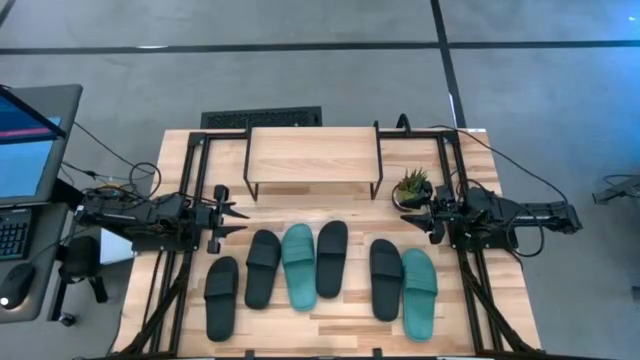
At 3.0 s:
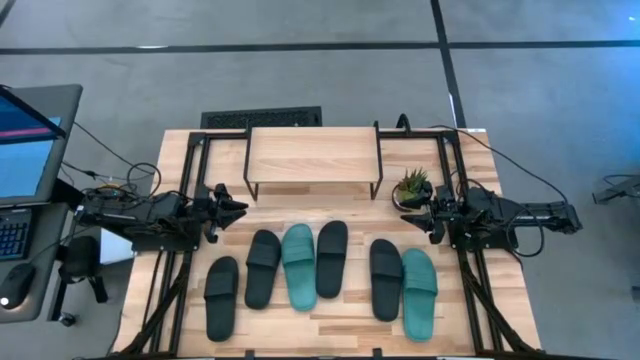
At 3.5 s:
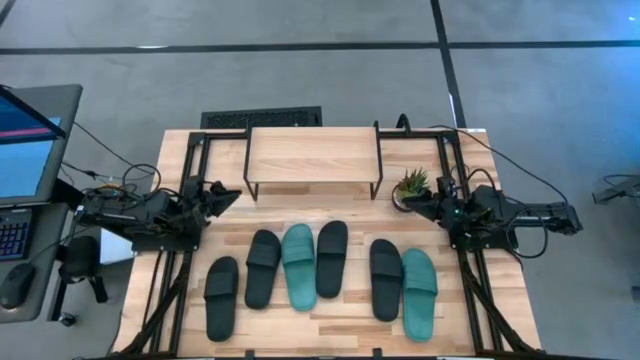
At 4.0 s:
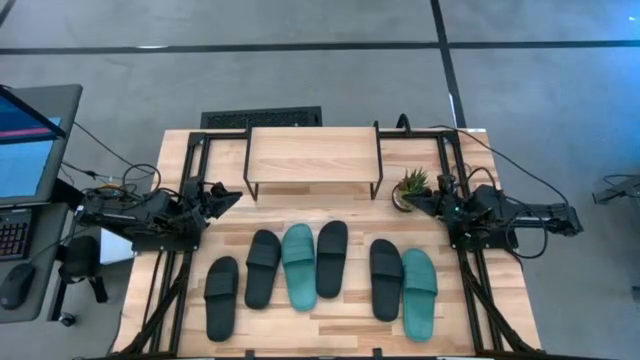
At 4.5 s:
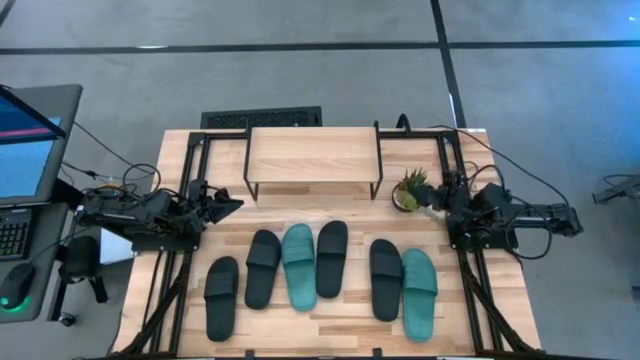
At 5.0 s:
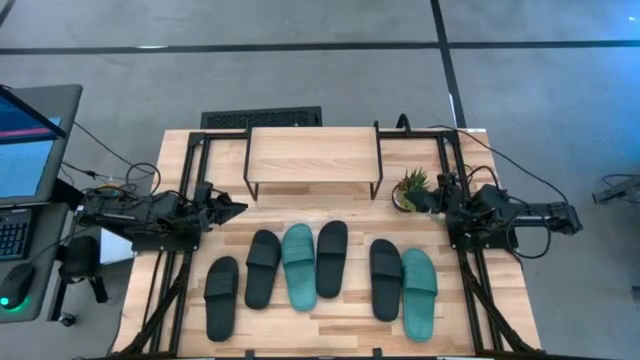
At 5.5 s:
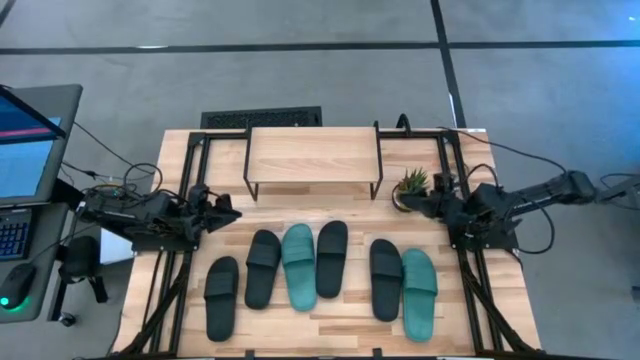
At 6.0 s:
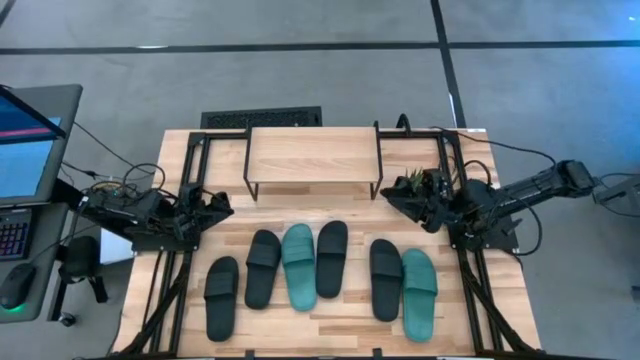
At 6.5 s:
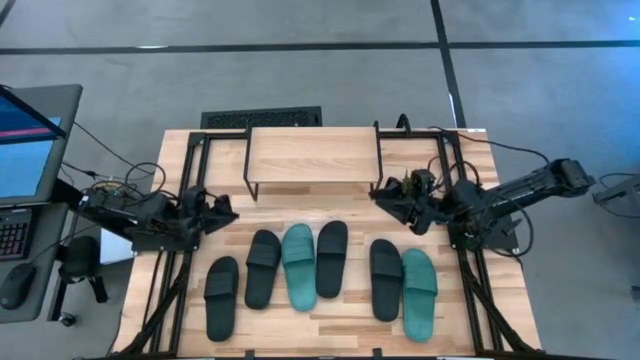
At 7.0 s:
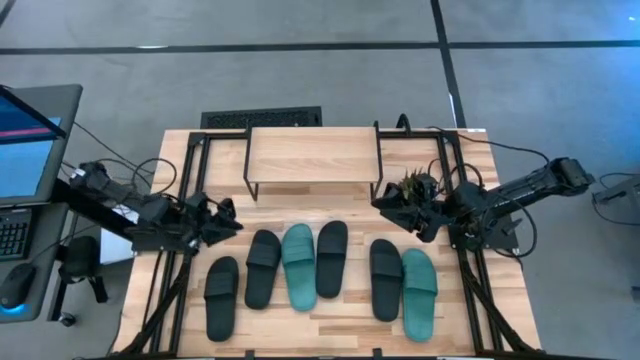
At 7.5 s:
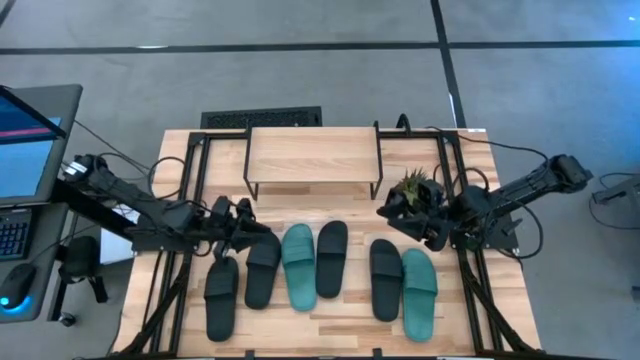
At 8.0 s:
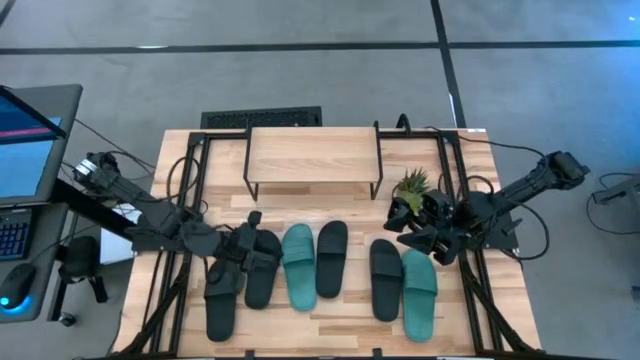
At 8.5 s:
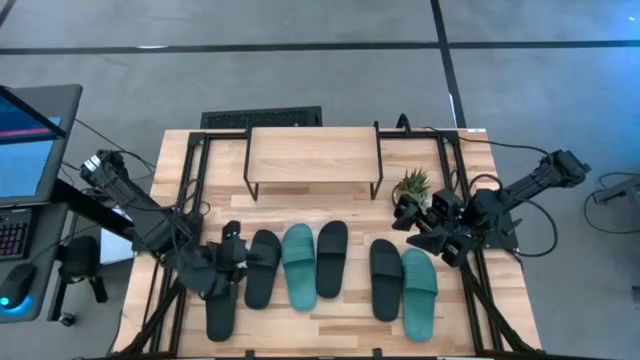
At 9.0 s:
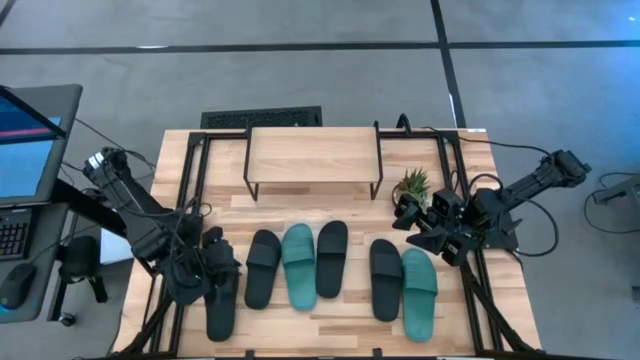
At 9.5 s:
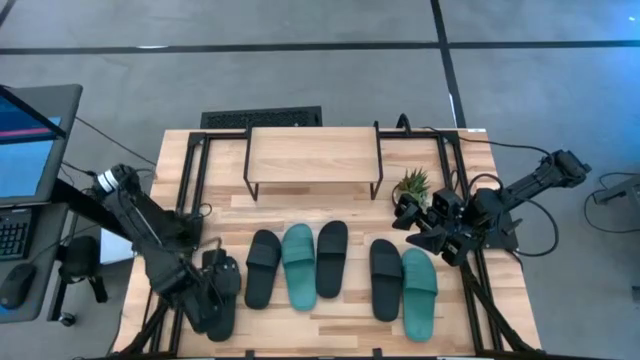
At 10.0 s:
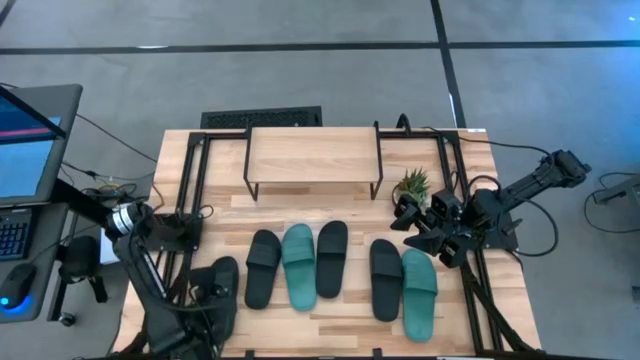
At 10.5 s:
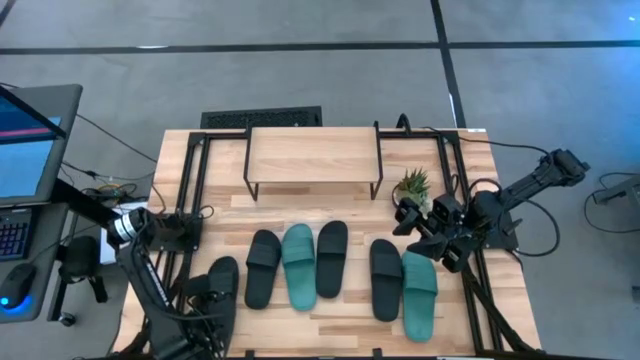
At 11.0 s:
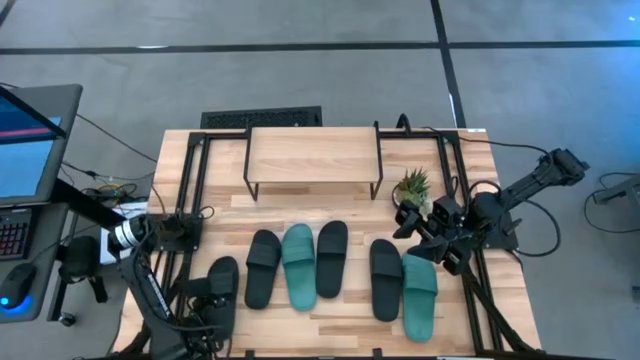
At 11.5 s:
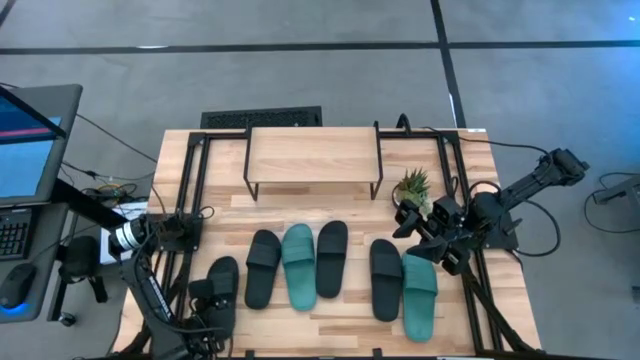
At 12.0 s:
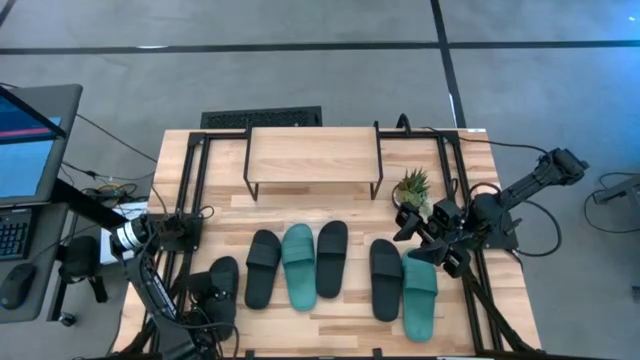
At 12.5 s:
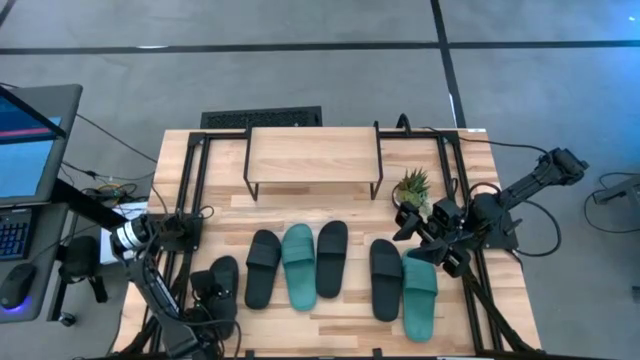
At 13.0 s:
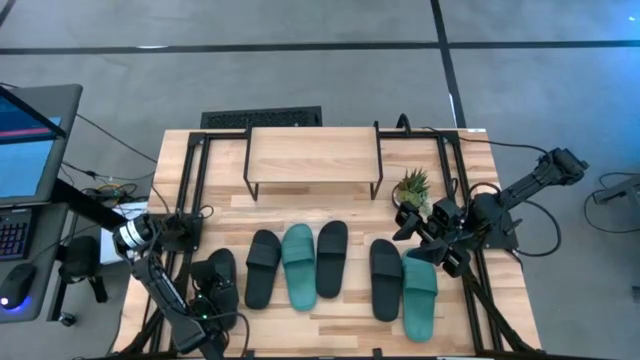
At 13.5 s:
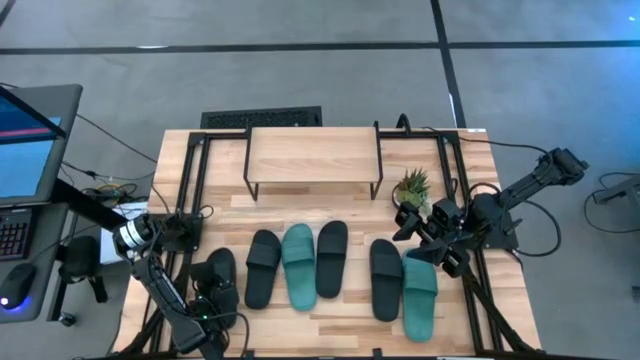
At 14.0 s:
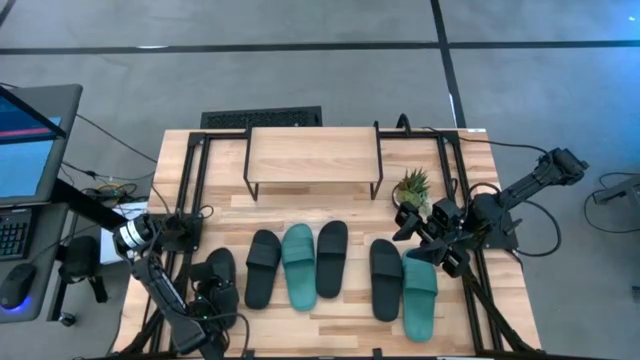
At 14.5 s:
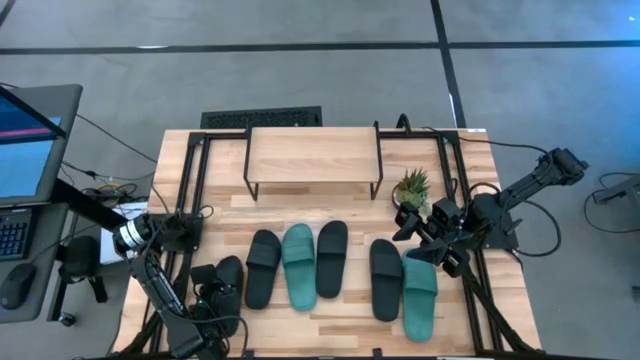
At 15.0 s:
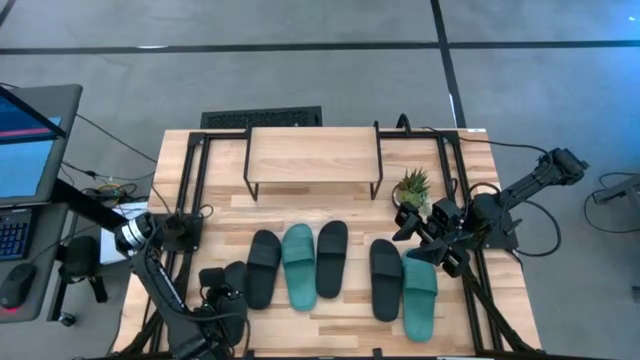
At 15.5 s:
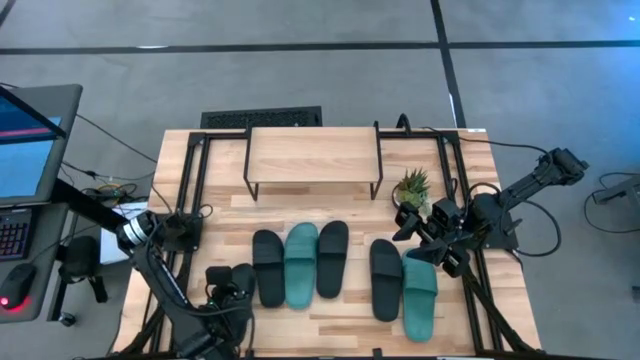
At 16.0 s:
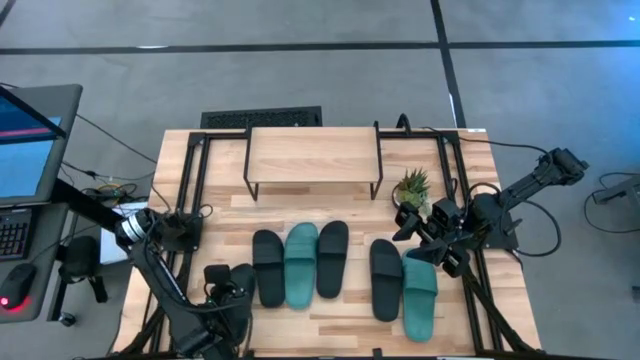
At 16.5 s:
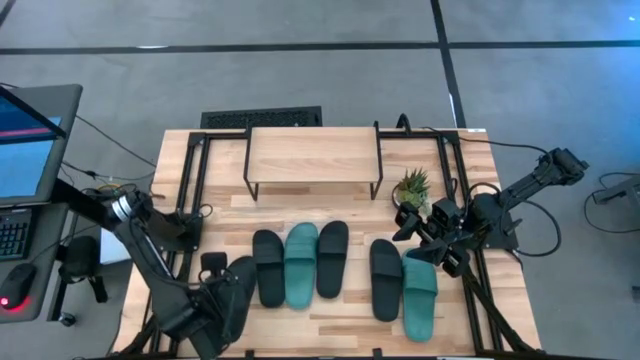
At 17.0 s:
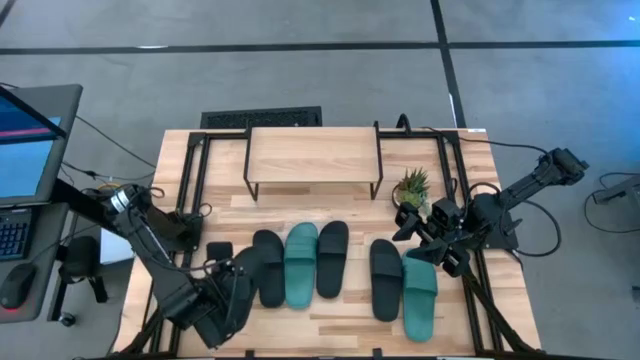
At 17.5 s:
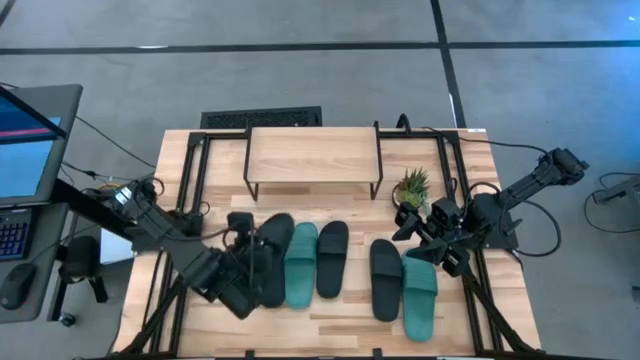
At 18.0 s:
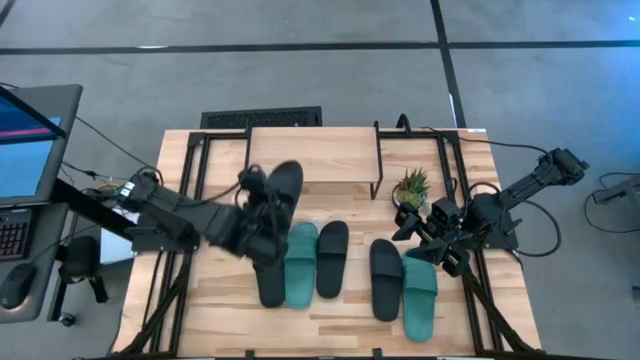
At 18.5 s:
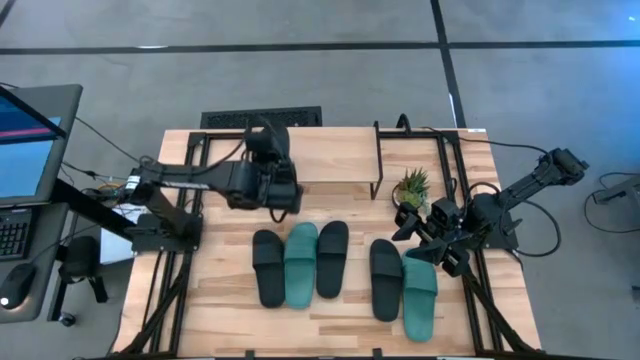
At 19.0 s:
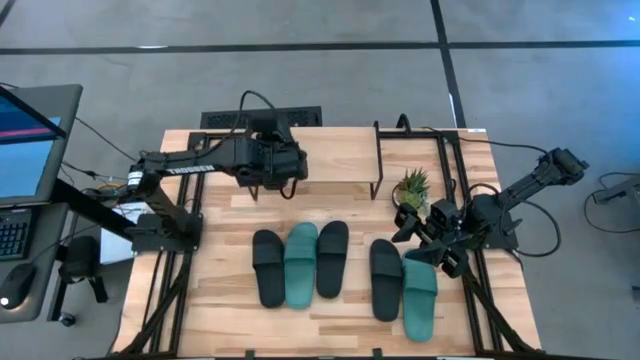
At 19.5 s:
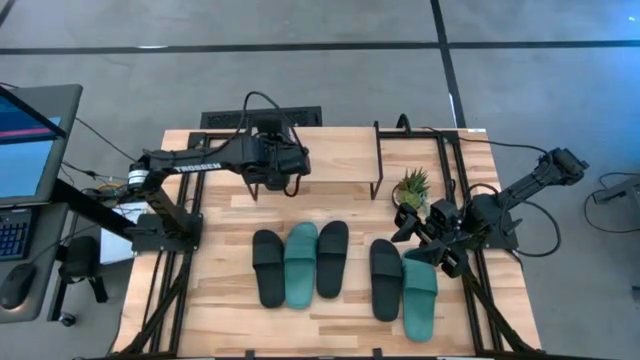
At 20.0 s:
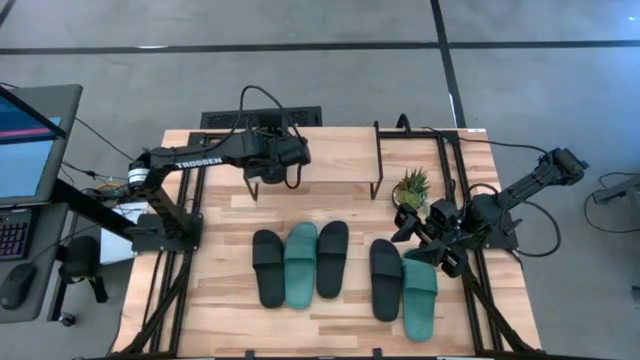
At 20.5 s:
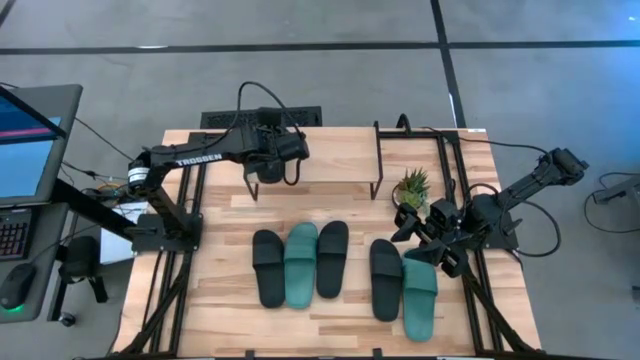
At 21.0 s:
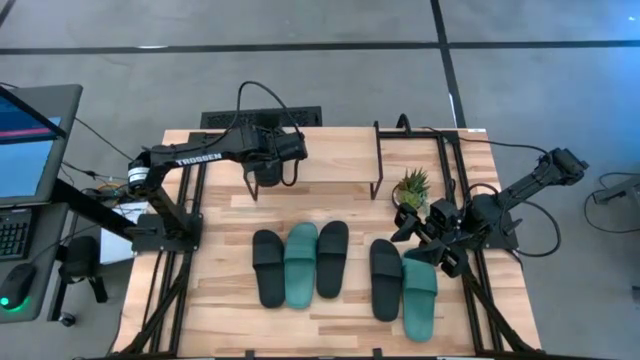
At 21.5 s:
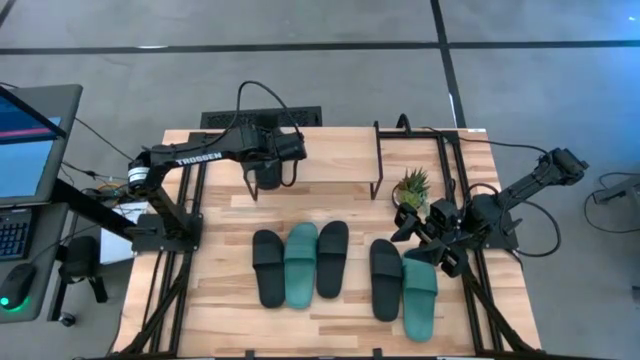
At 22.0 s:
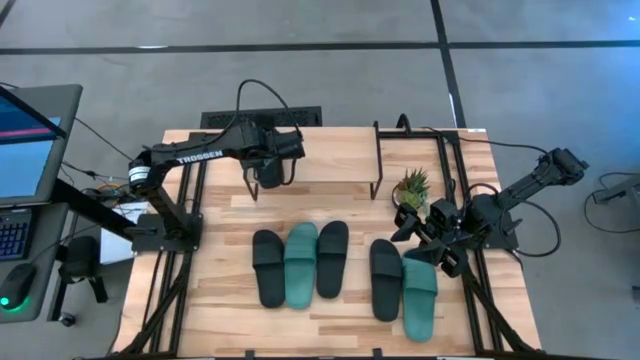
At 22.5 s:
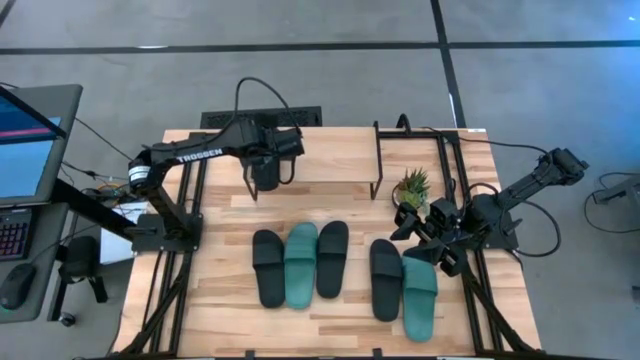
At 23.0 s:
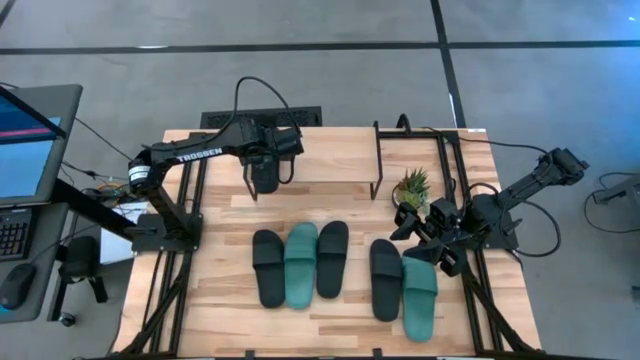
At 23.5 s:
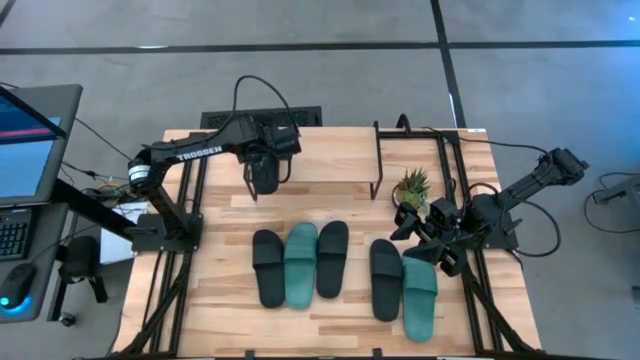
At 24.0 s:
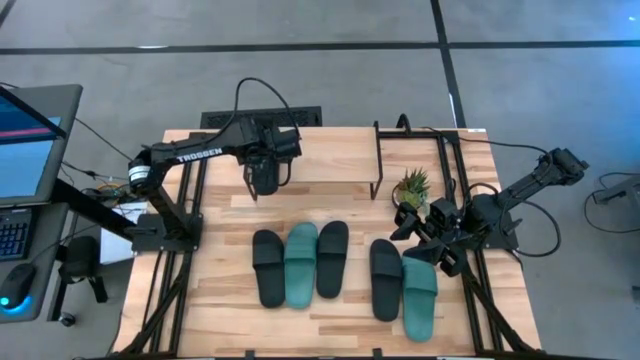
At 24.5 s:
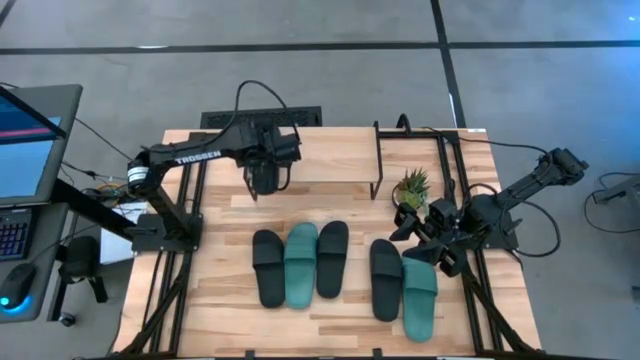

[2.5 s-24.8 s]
Task: Pick and place slides into the shelf
Put the black slipper on the shelf
